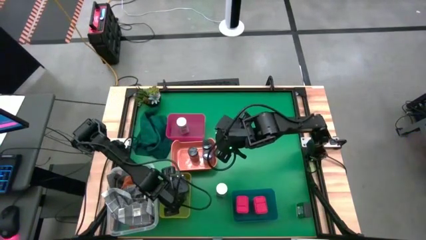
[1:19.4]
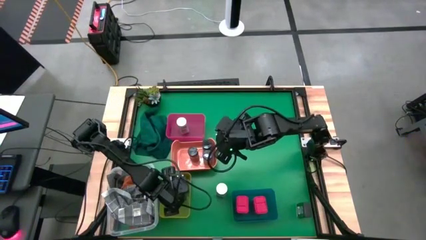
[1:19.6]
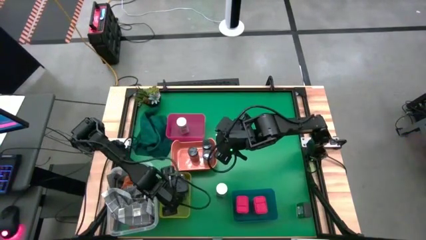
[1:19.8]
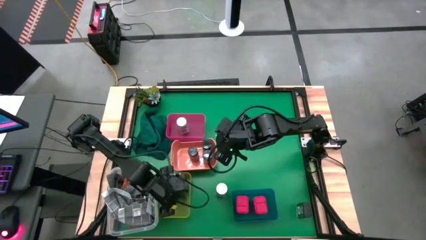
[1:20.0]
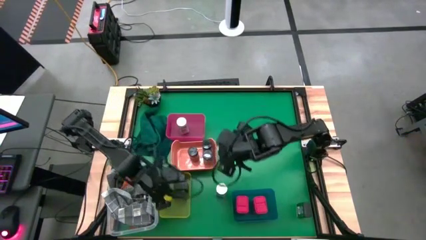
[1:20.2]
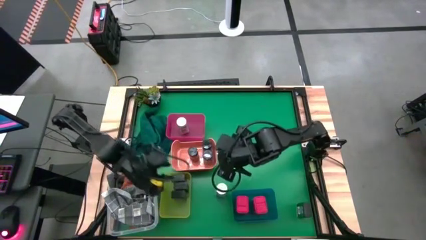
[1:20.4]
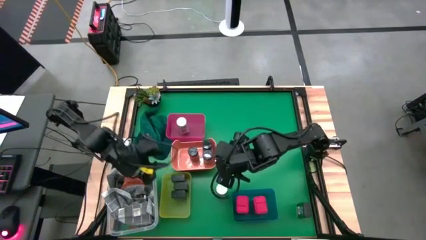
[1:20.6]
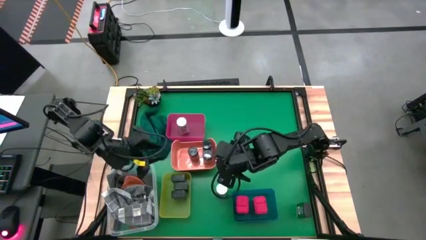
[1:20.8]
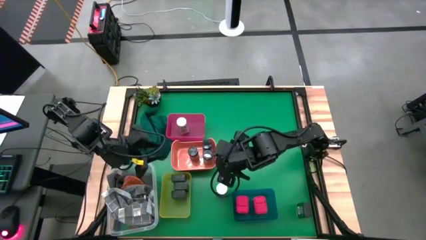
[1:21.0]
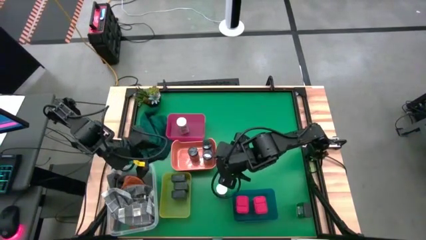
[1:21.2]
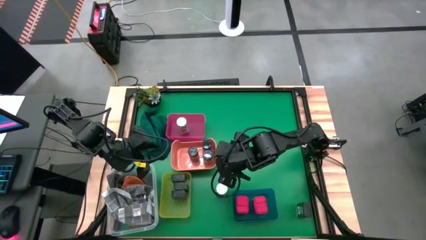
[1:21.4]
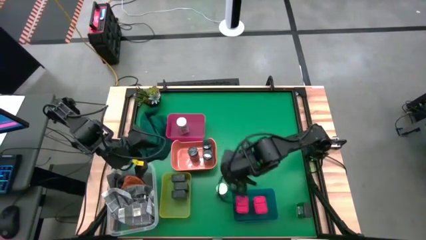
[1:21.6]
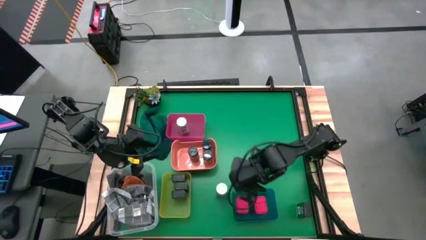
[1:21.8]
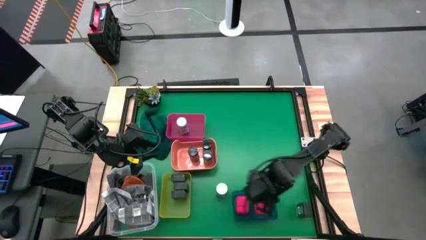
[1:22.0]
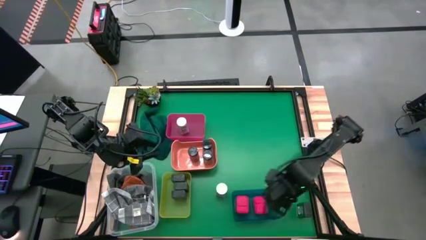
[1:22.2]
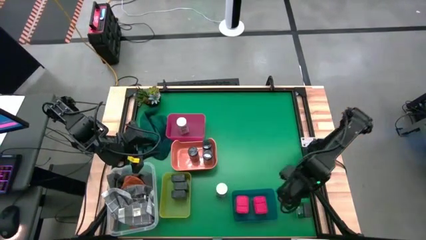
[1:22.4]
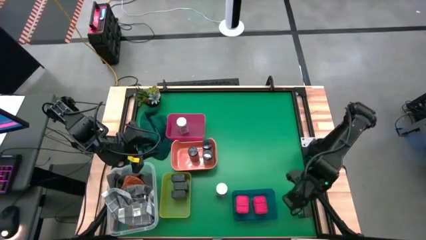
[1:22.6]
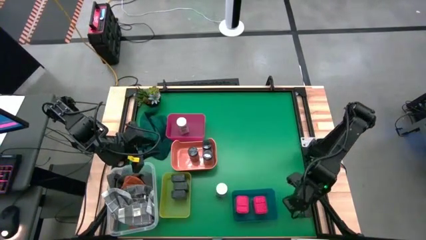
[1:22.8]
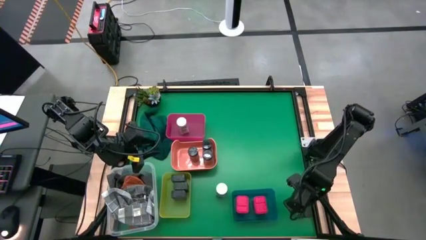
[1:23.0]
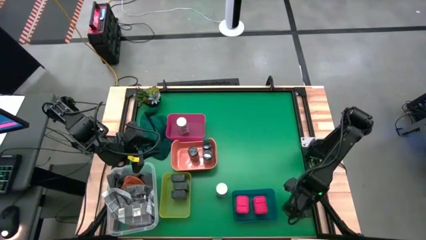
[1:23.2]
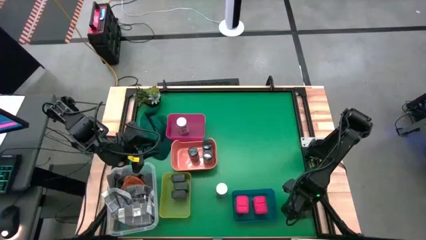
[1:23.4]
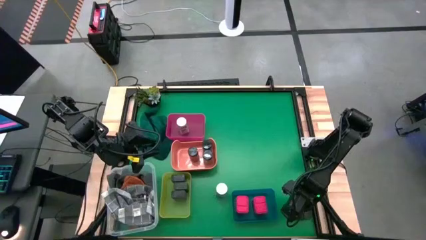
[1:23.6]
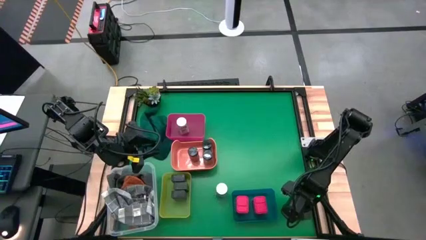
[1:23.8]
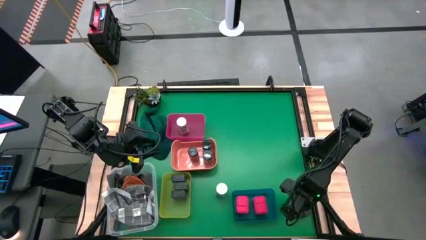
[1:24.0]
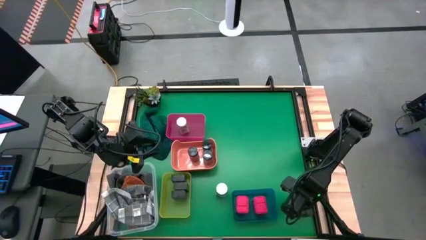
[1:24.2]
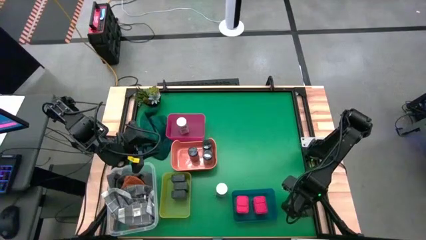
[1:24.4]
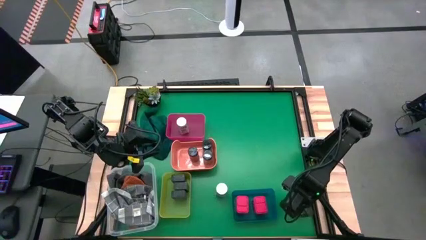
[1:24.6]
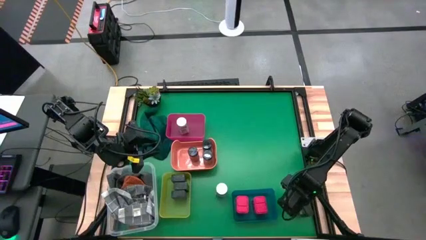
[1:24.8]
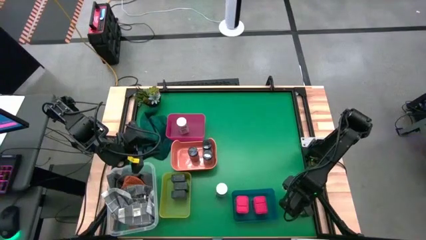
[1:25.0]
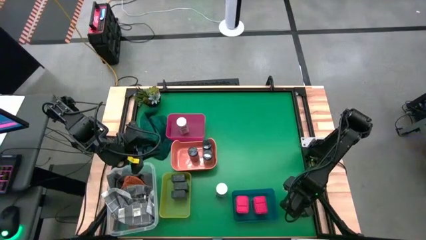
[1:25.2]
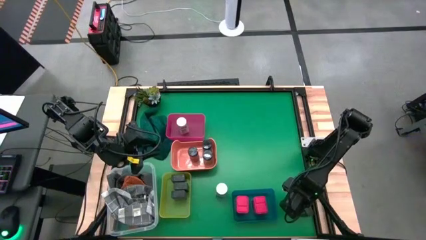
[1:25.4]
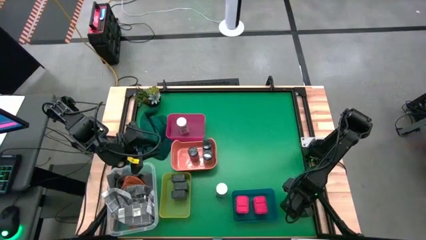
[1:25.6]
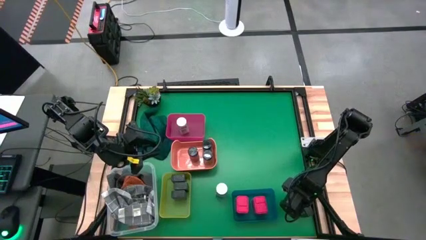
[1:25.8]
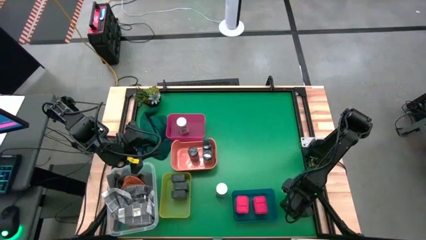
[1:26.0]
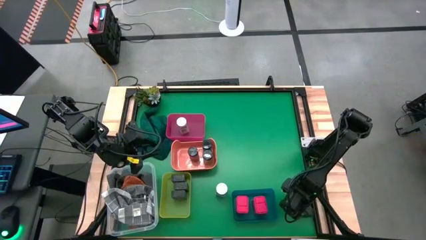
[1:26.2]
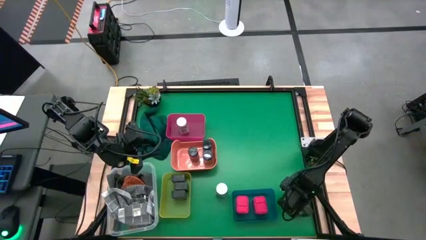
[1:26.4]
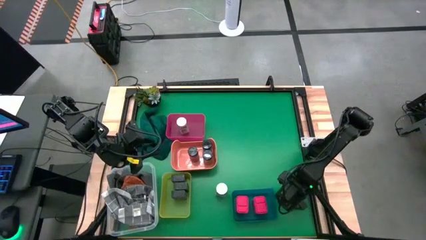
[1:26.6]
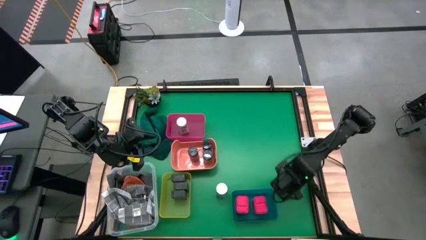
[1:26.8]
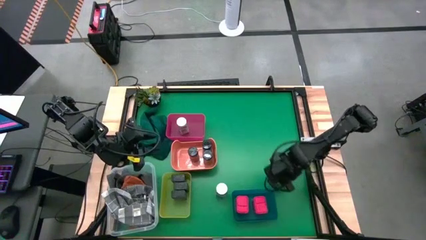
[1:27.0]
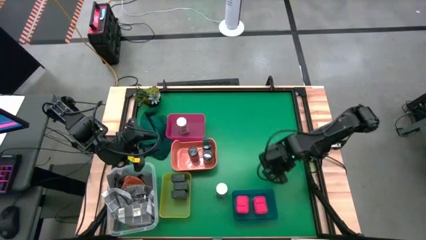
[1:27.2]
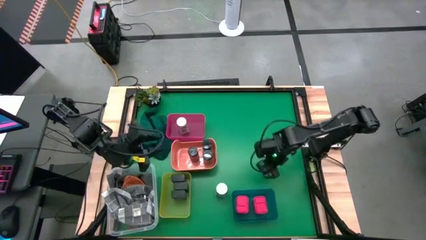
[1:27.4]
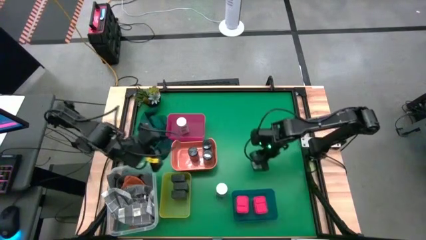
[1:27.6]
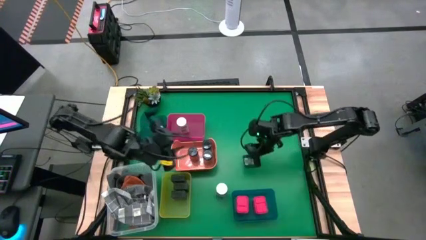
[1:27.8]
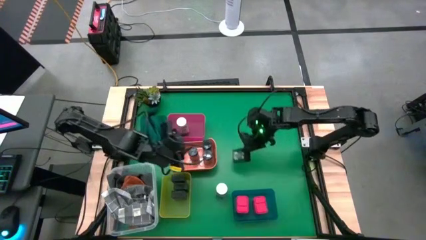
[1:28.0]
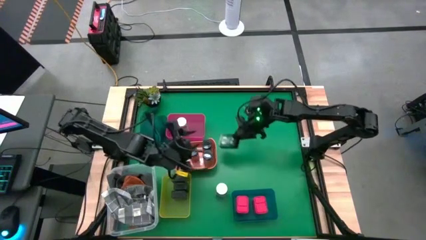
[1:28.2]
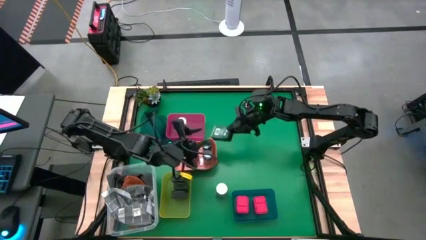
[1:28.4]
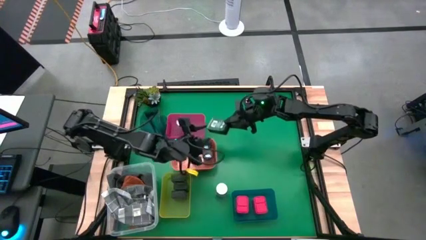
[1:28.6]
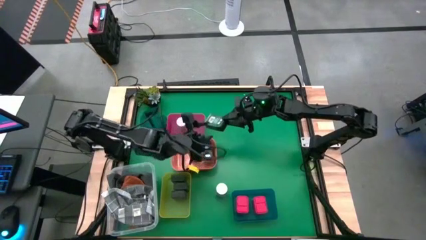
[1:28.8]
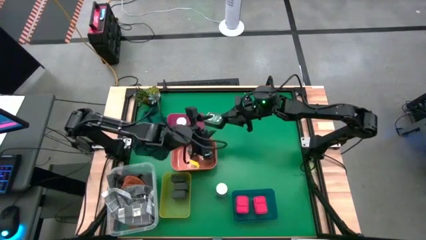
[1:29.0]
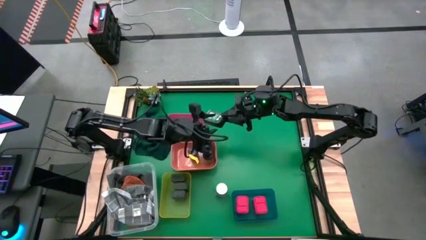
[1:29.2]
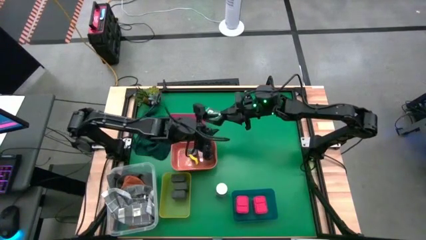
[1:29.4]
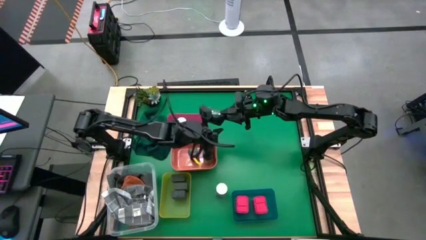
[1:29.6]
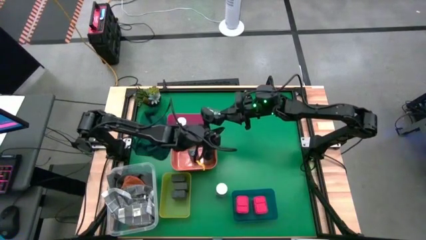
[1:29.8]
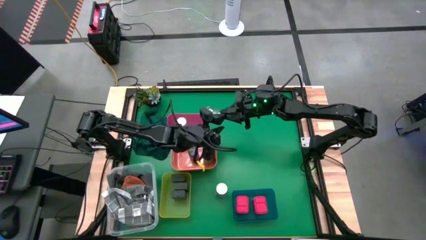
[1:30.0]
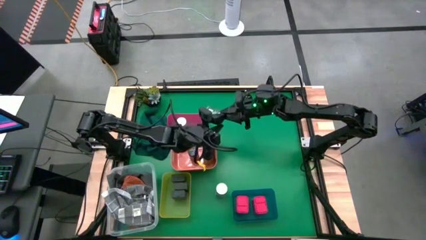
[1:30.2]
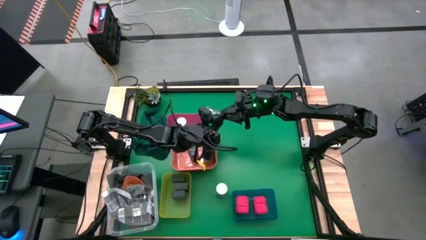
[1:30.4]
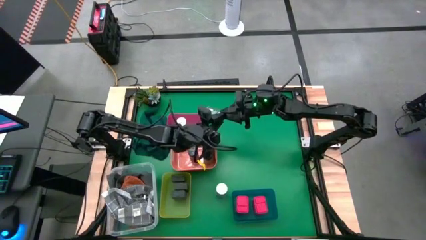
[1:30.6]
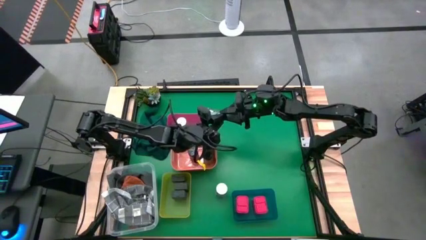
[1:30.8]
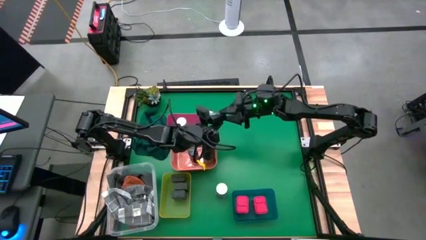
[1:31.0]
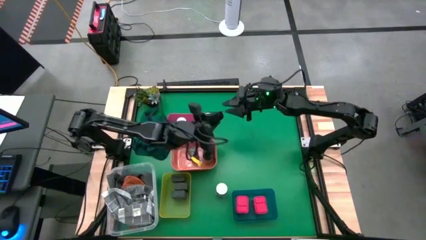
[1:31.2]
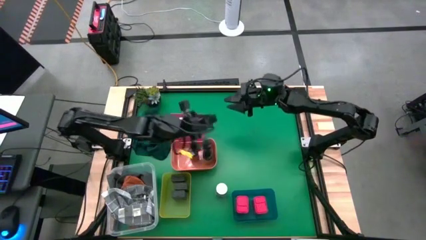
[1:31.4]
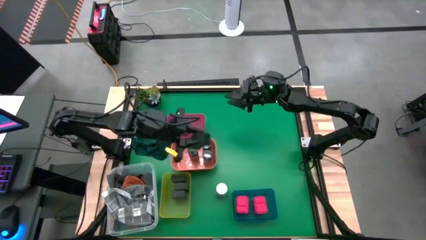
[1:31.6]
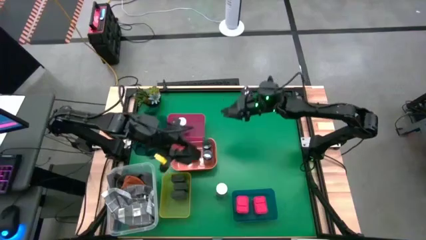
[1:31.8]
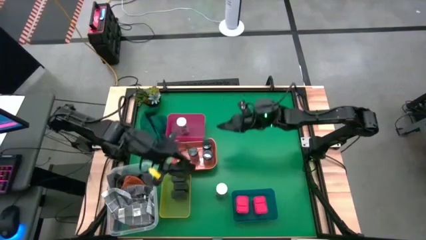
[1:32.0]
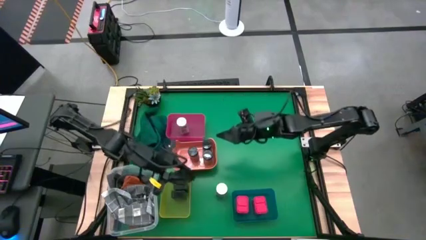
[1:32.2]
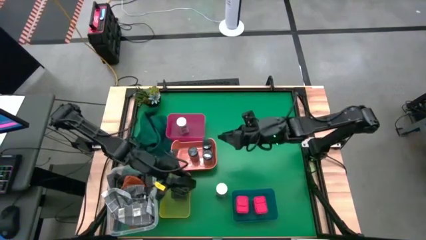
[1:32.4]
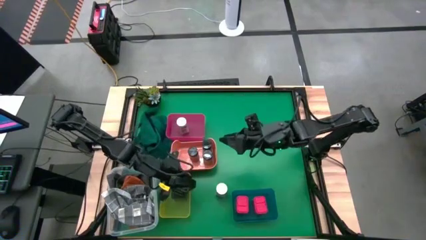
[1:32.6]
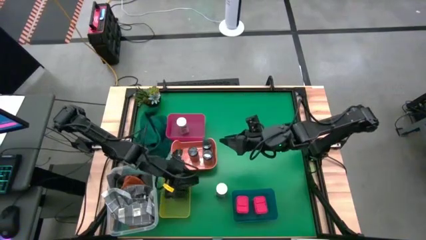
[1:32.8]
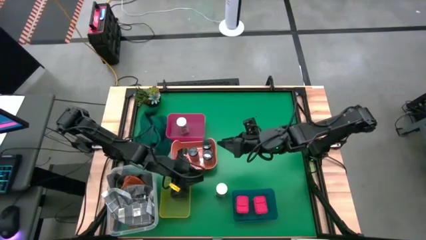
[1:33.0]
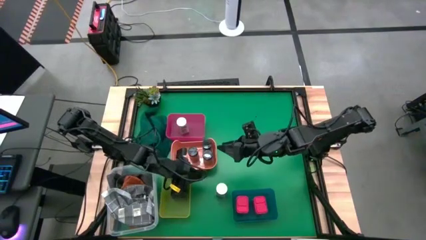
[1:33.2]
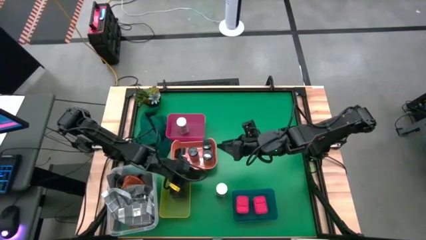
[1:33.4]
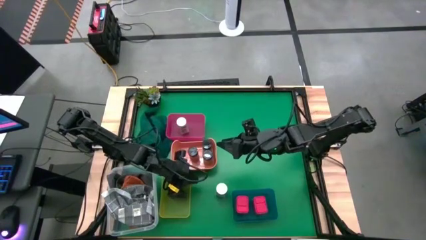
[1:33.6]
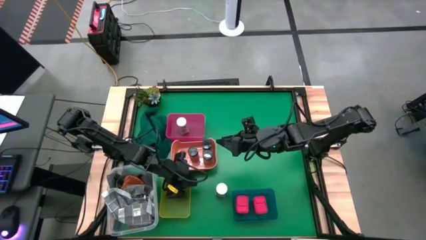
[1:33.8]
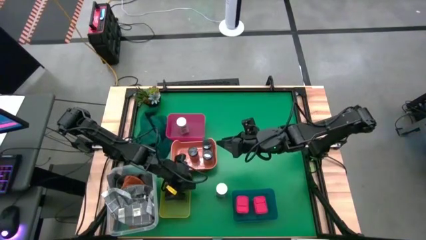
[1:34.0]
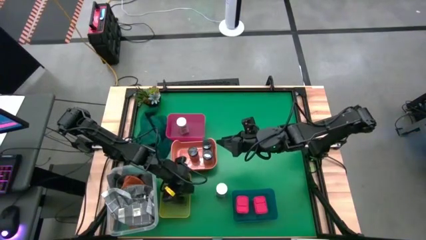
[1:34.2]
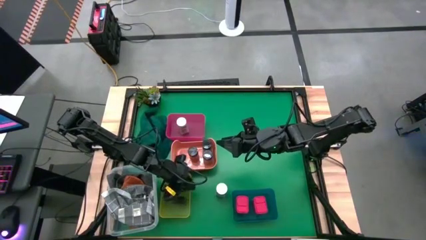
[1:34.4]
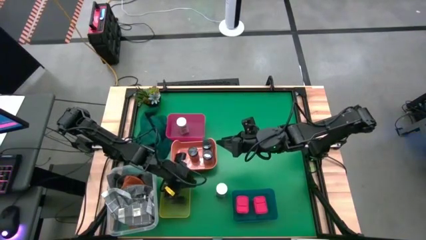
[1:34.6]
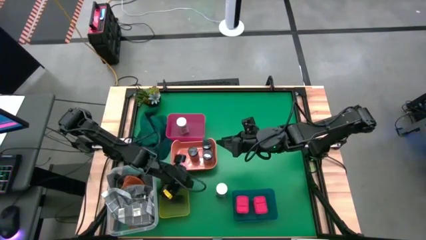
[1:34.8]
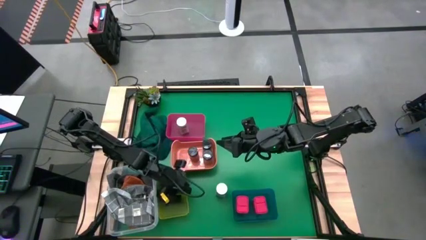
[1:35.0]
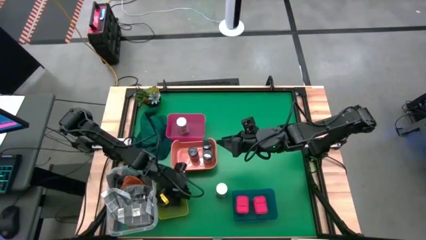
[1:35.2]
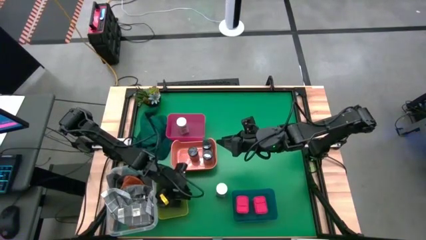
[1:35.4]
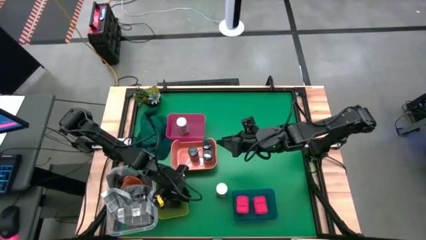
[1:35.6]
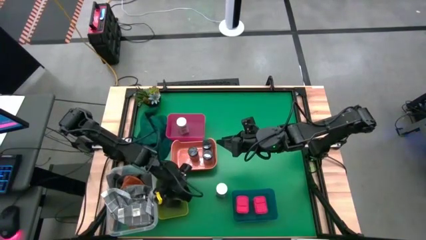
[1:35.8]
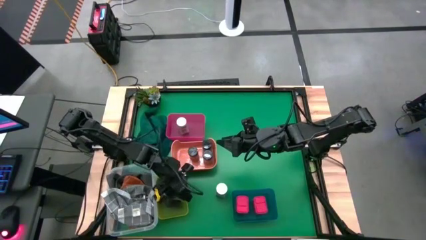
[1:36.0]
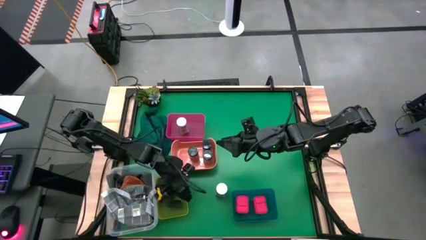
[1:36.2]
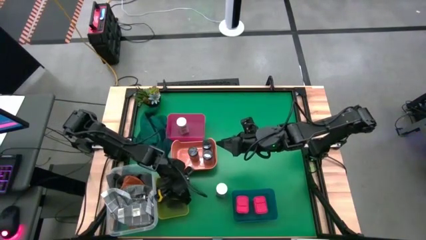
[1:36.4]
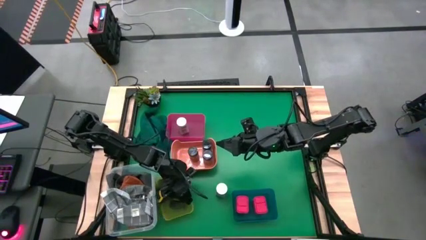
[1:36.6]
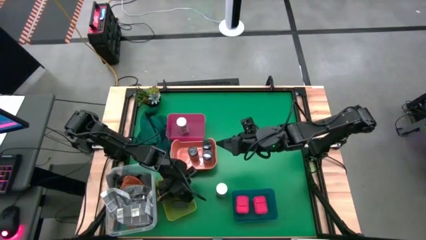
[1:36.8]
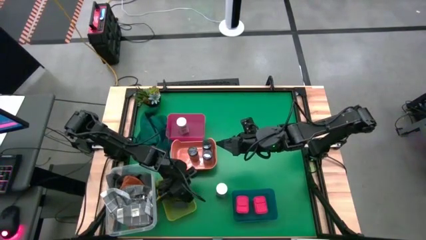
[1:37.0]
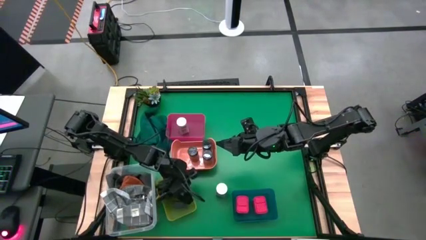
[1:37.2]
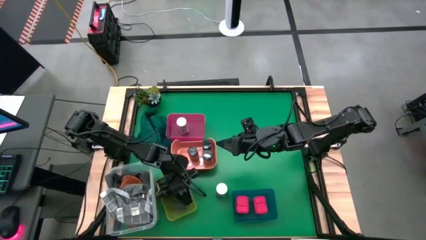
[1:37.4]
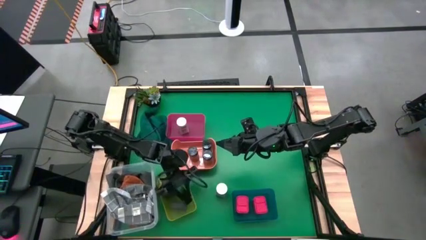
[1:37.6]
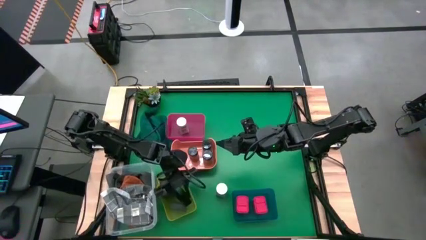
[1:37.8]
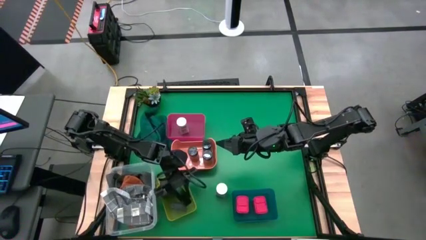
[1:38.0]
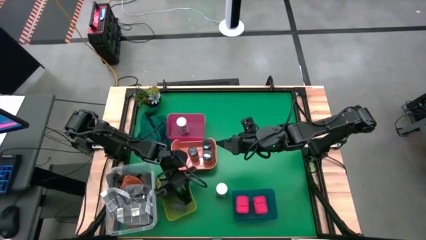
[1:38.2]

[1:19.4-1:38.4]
Task: Sort spices by type
Put the green seasoning can into the yellow bin
